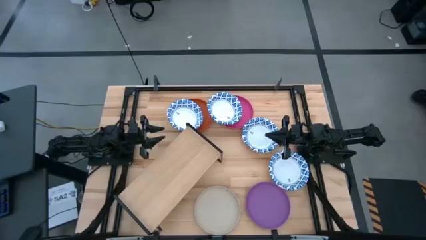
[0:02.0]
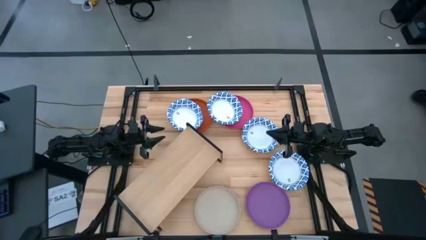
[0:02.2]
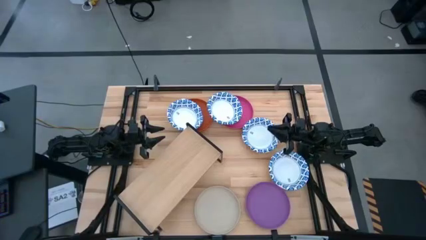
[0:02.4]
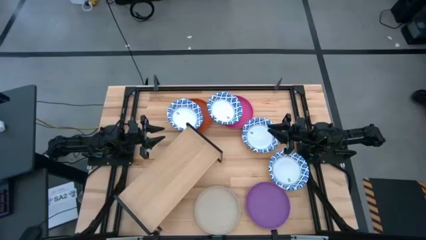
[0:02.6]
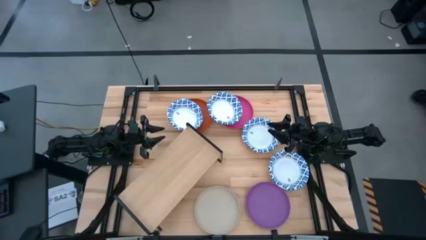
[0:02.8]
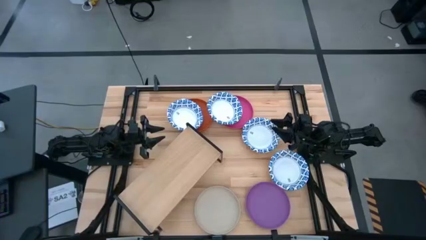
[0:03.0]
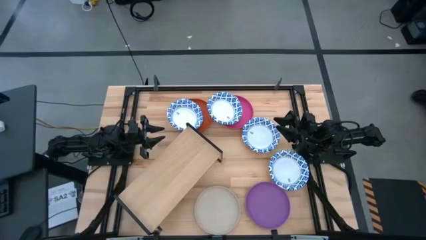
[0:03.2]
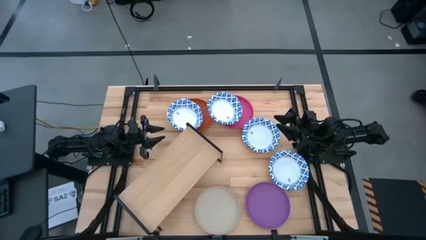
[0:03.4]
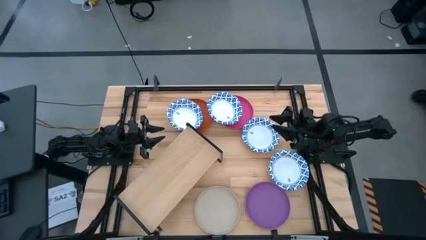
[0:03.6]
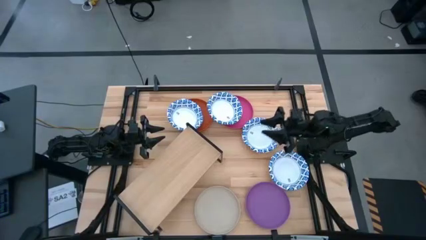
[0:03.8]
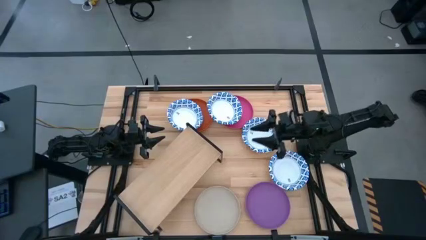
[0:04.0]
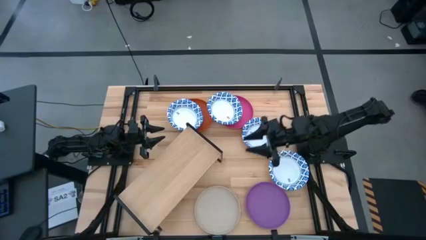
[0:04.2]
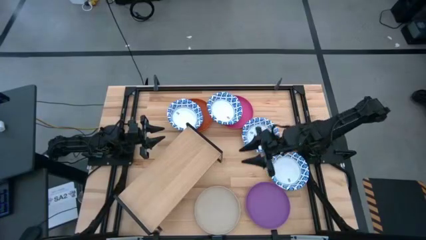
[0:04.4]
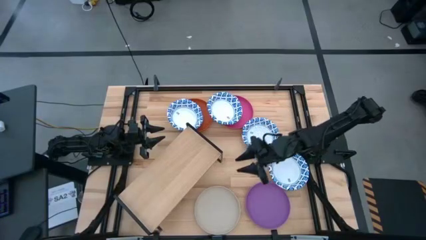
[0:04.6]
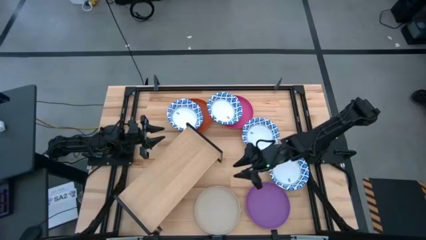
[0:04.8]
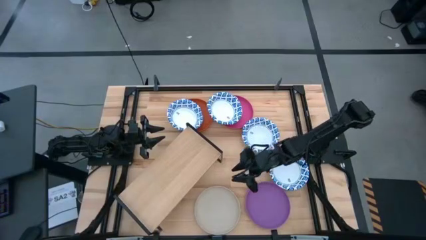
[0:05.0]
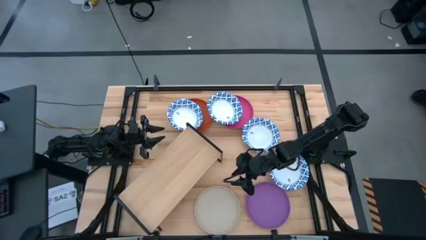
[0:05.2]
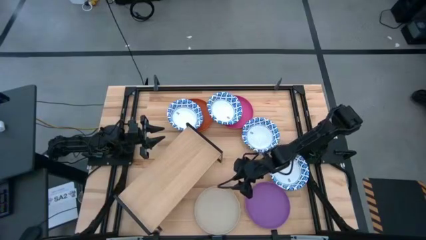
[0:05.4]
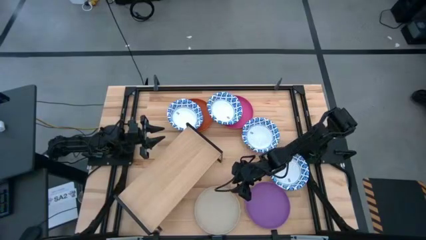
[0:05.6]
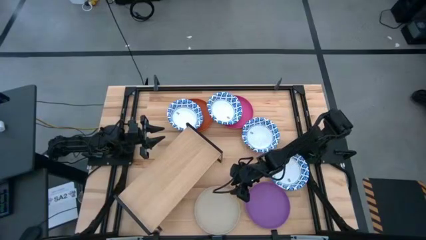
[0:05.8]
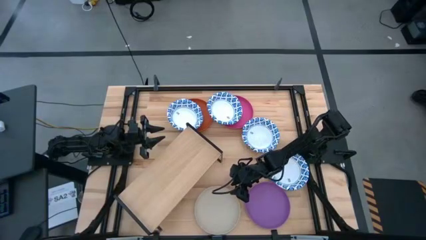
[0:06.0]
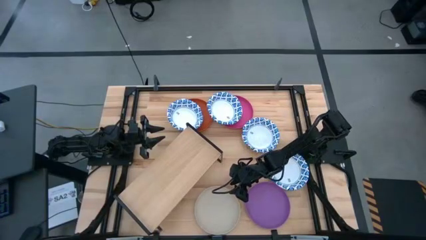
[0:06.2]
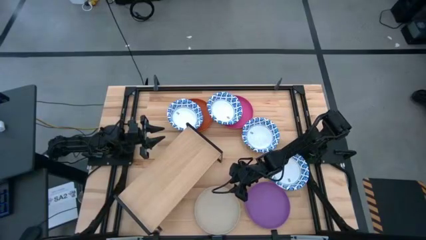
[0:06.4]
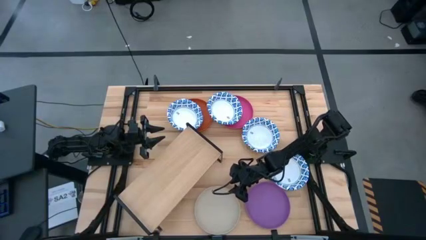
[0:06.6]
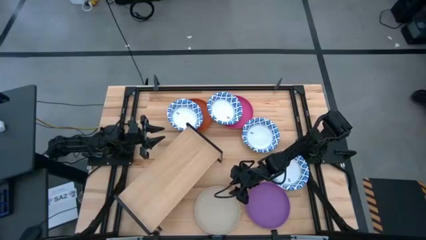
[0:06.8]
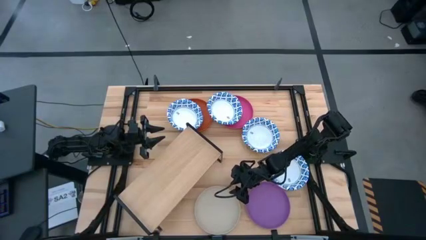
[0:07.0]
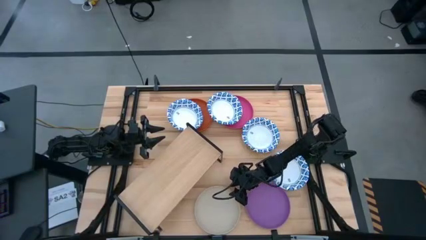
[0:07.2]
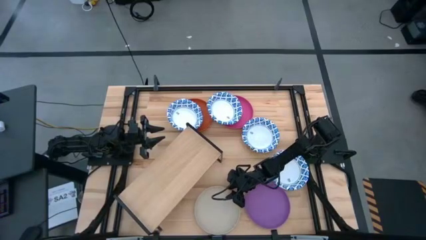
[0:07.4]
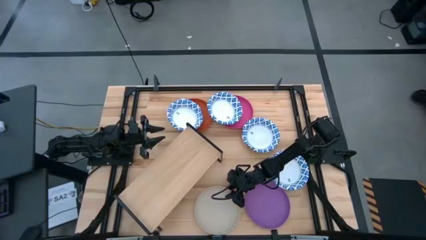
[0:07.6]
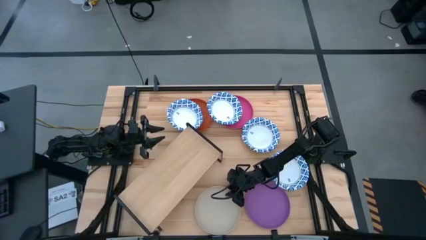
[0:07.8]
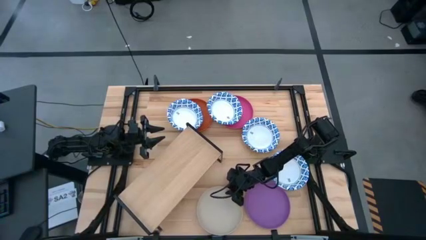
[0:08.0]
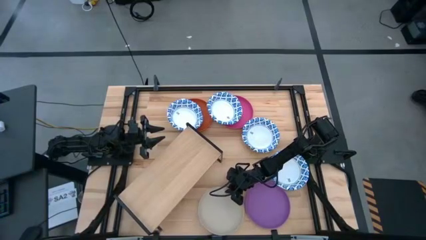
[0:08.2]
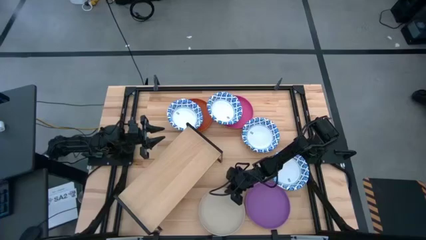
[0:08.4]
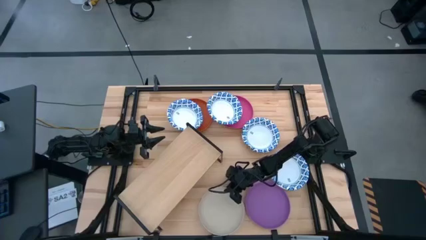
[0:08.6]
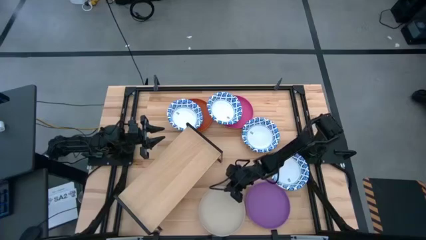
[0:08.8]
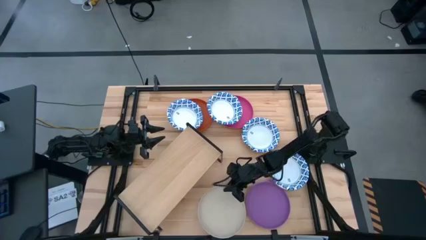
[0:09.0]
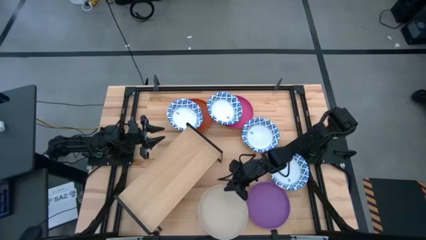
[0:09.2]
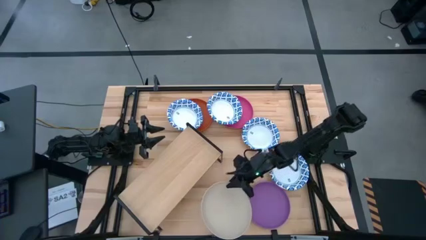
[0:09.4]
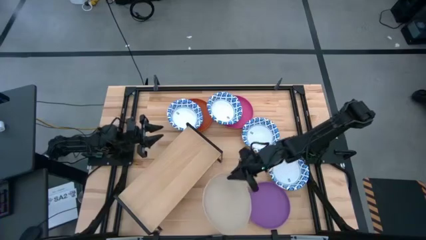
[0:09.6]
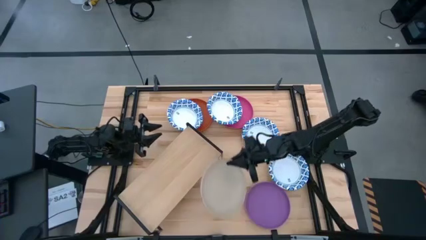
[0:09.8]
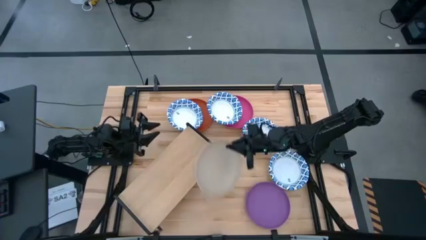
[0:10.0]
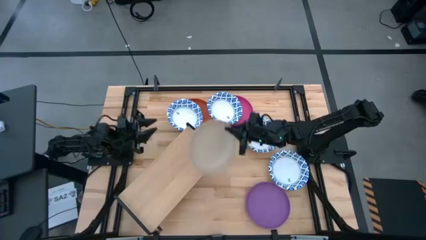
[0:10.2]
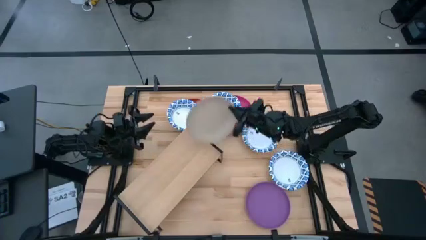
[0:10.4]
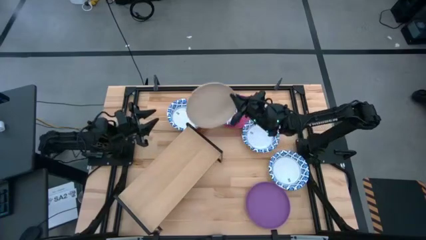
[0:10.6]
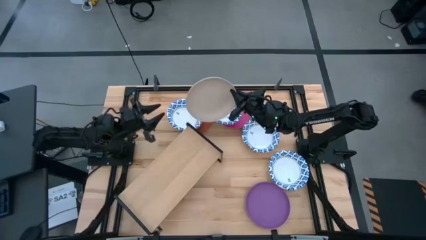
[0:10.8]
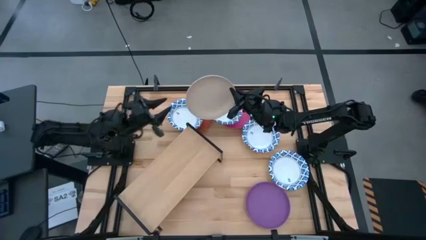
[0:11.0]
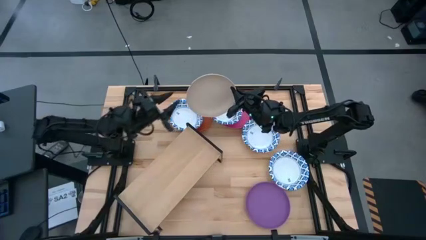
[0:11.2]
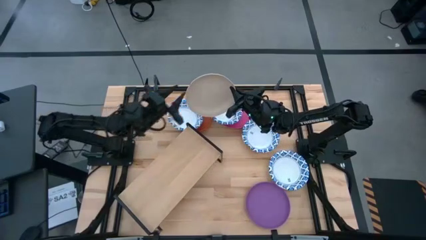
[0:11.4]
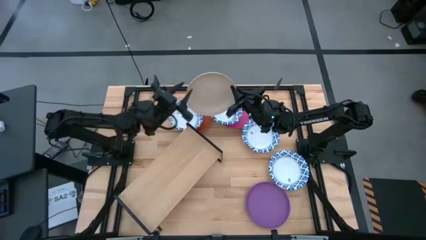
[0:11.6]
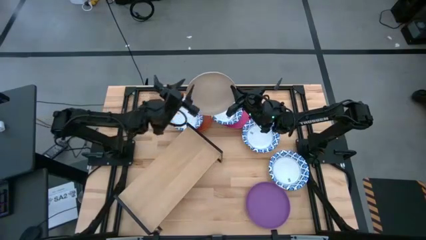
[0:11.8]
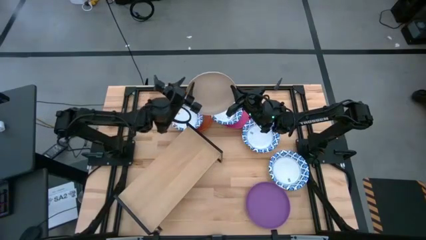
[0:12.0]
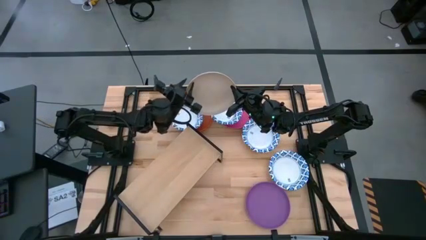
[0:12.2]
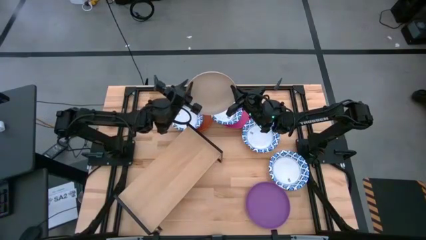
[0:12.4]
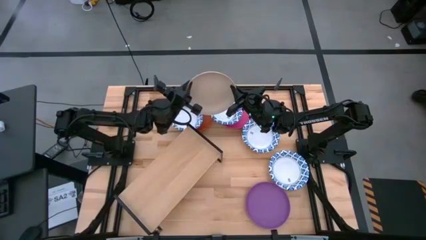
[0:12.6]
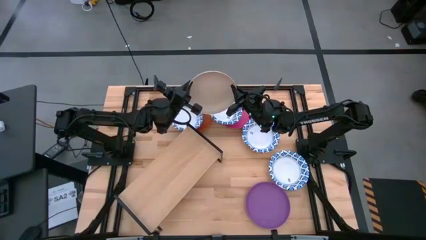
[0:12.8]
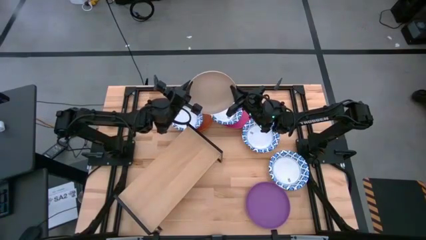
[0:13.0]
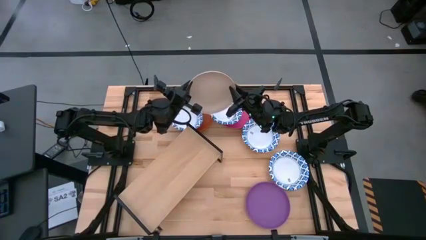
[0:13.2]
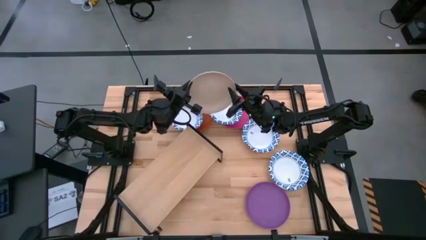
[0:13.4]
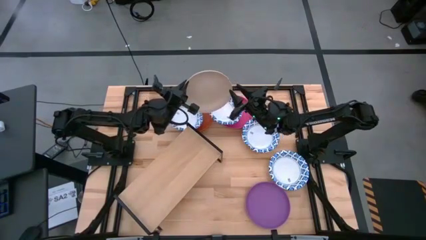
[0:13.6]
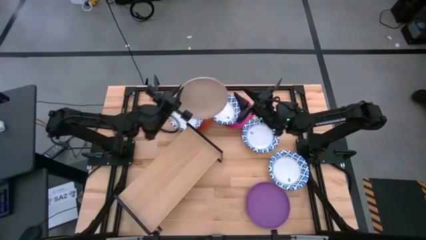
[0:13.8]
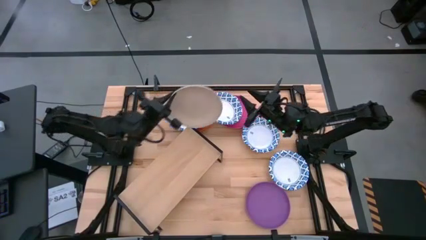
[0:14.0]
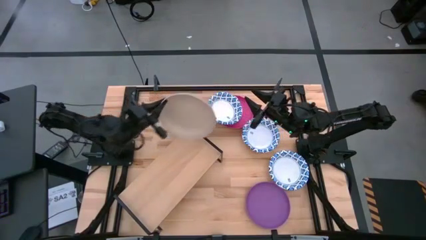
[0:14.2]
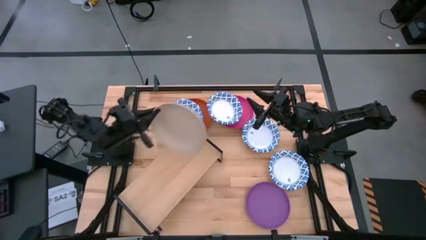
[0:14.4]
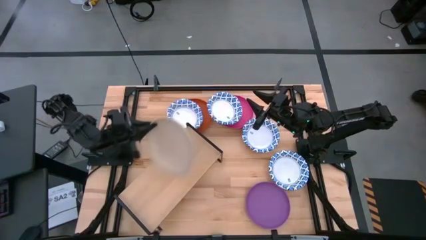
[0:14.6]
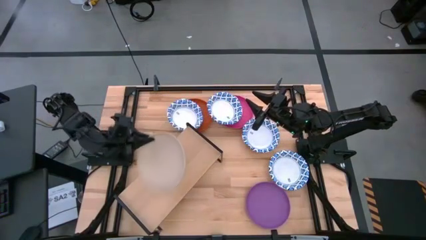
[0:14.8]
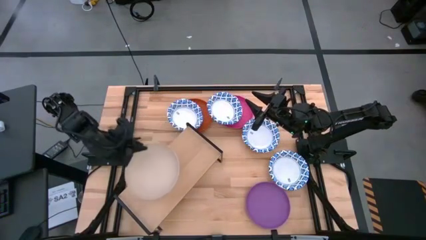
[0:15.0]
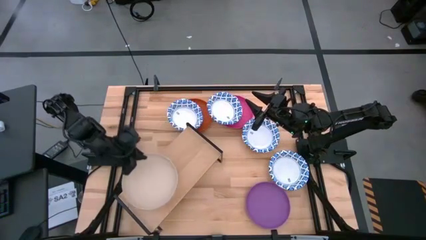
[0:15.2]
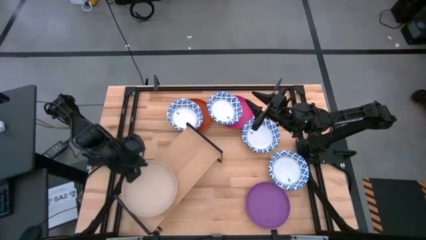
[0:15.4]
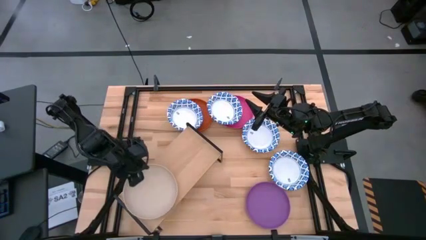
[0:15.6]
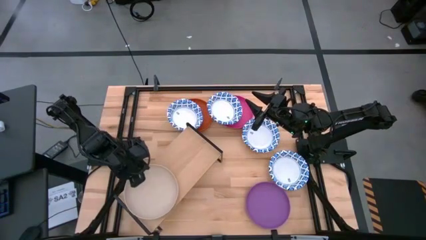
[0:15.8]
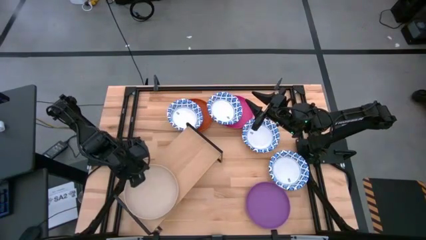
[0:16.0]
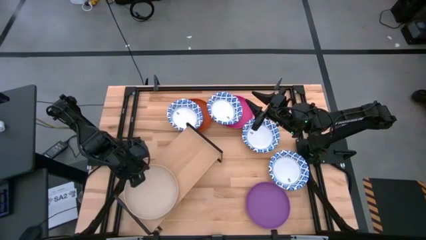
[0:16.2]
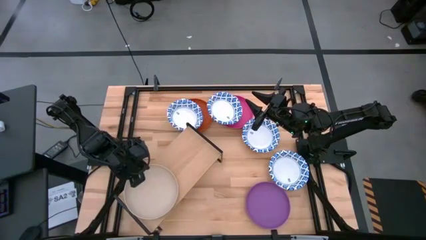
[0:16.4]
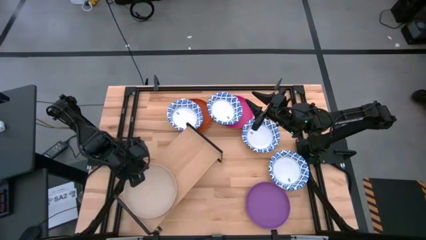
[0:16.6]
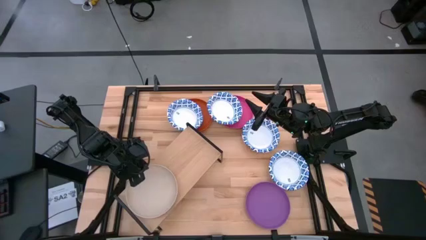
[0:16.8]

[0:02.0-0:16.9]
Task: Place and stack plates onto a shelf
Put the light brown plate on the shelf

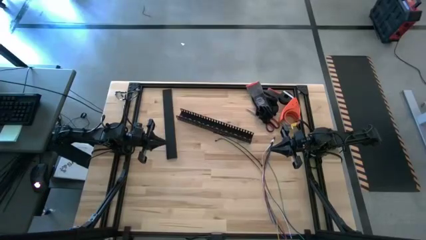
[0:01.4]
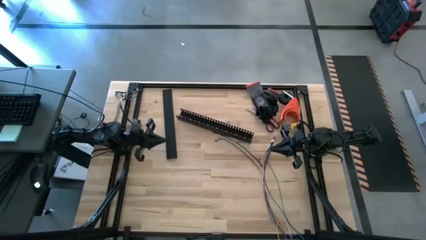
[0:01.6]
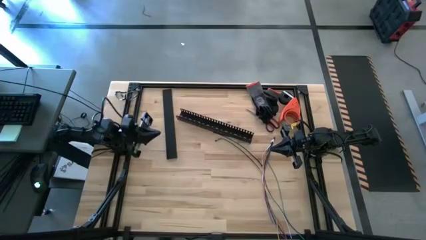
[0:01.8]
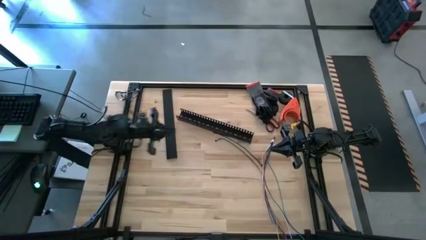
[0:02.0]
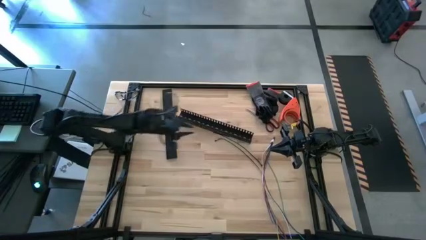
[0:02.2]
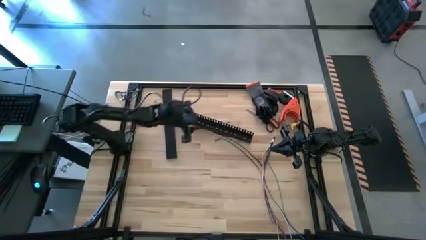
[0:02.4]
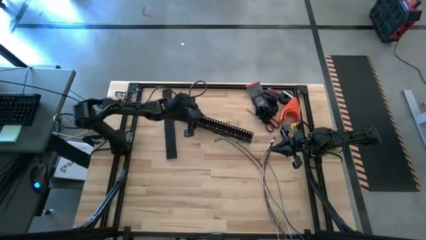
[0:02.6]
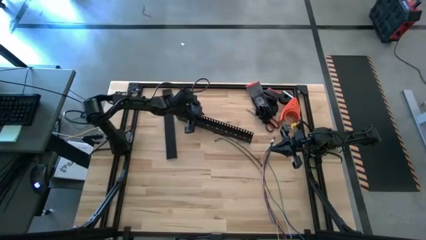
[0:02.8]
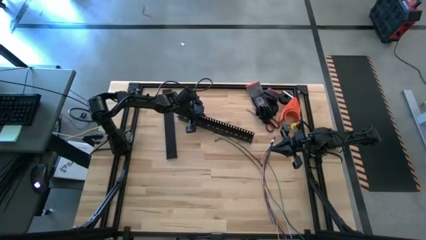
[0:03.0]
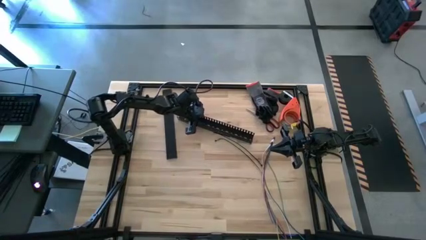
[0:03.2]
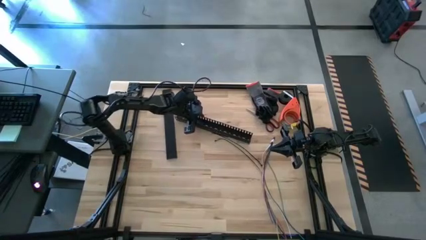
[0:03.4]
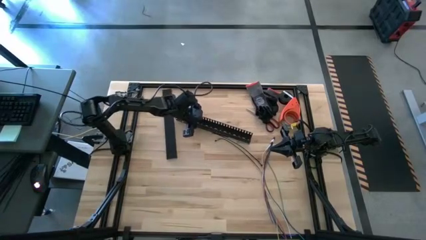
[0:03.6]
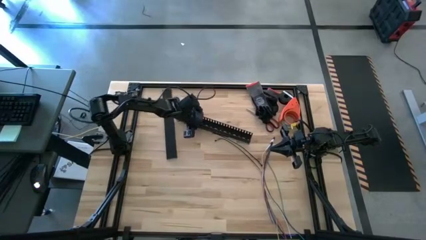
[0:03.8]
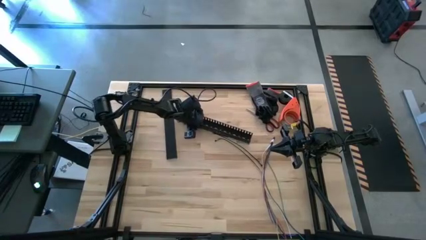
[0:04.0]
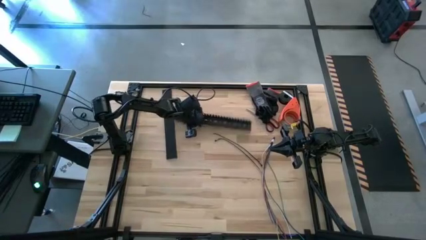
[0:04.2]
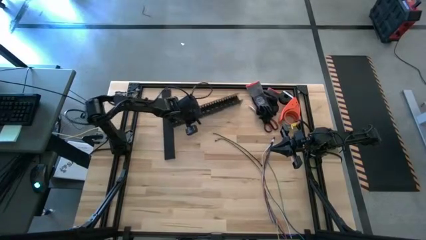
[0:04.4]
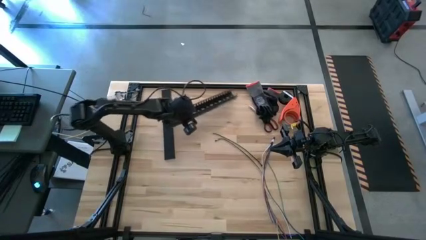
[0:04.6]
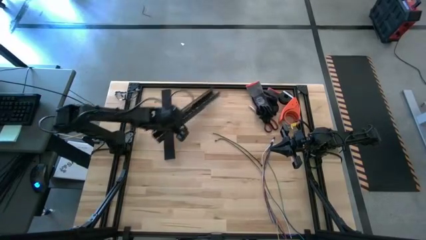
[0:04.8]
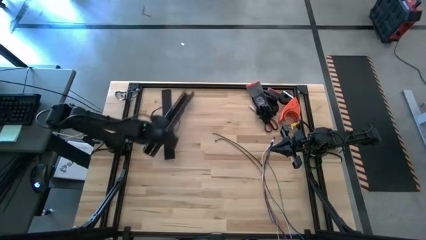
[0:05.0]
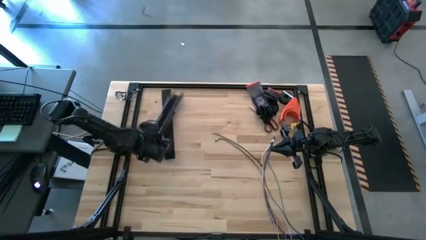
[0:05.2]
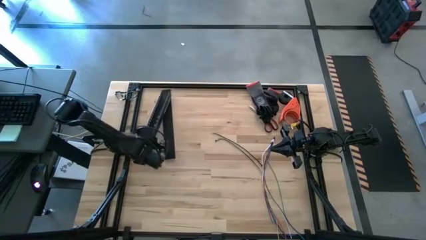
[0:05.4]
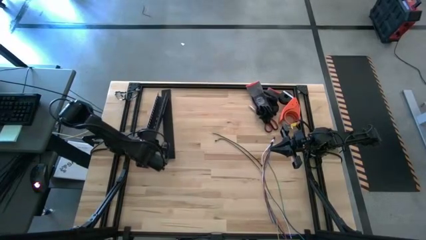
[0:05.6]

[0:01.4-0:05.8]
Task: Ziptie cables
Move the black cable duct to the top left of the table
